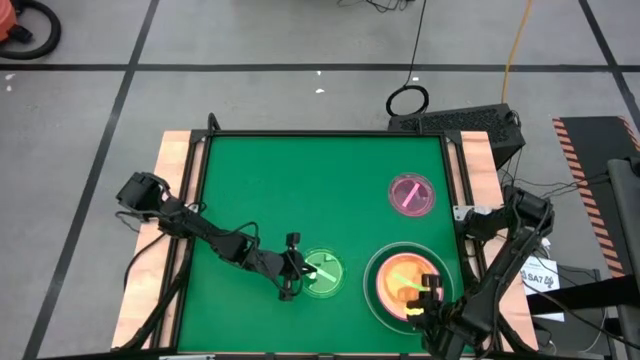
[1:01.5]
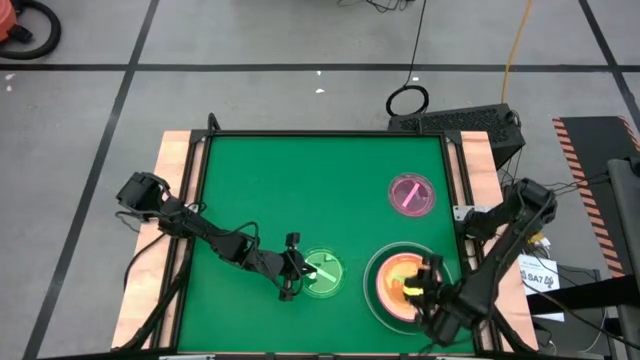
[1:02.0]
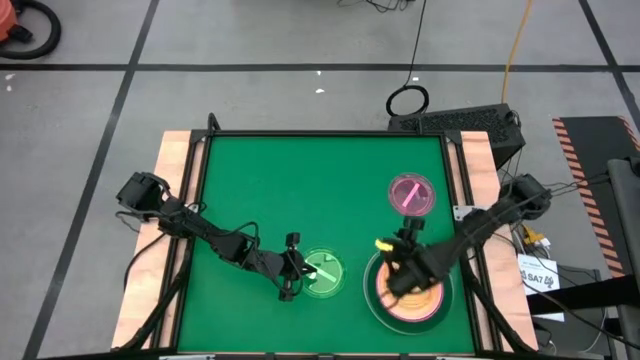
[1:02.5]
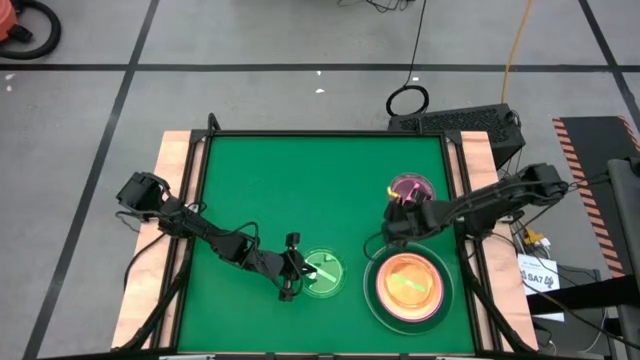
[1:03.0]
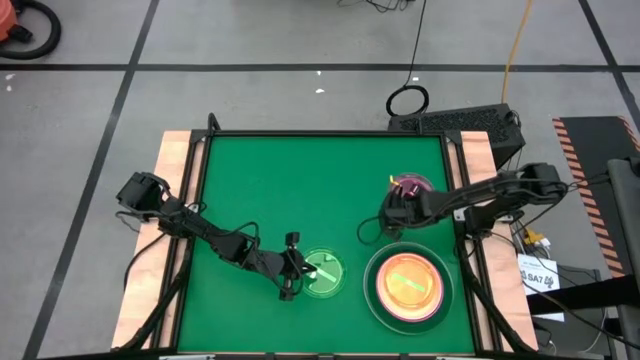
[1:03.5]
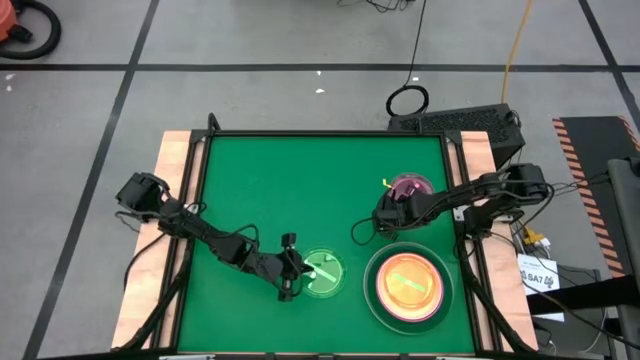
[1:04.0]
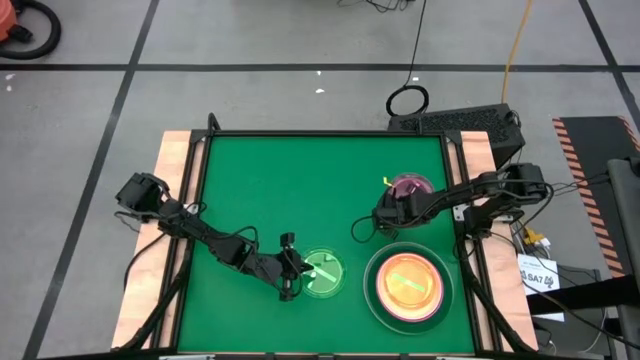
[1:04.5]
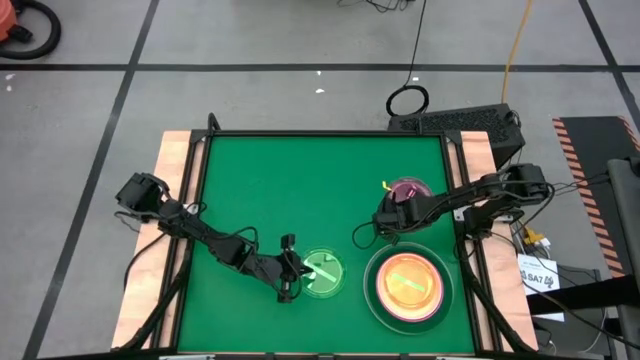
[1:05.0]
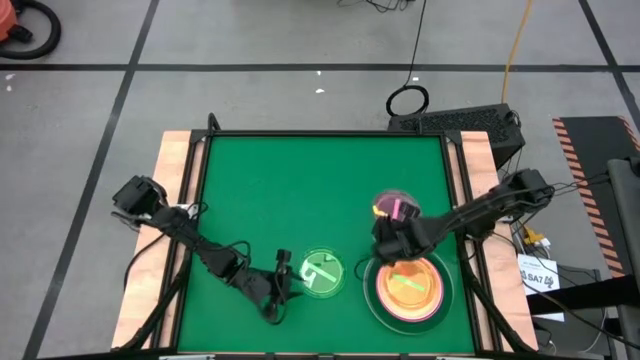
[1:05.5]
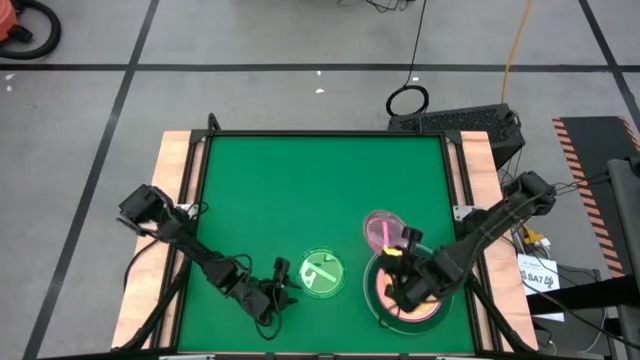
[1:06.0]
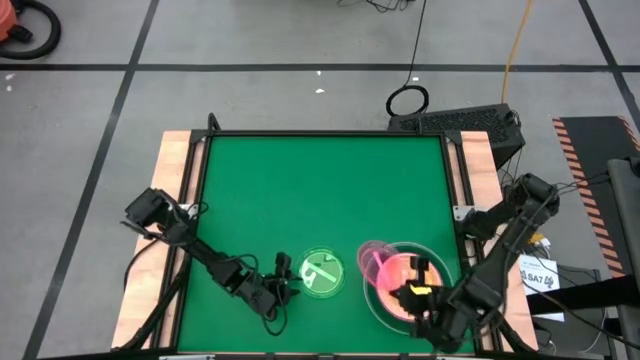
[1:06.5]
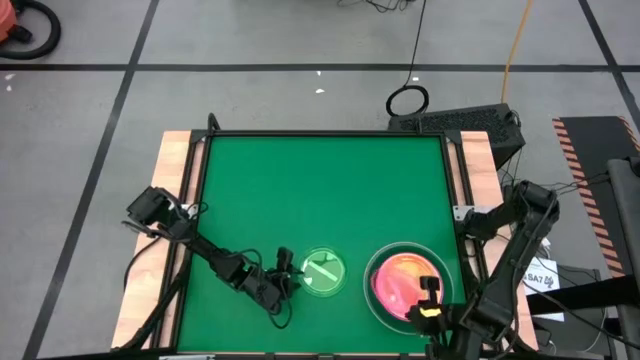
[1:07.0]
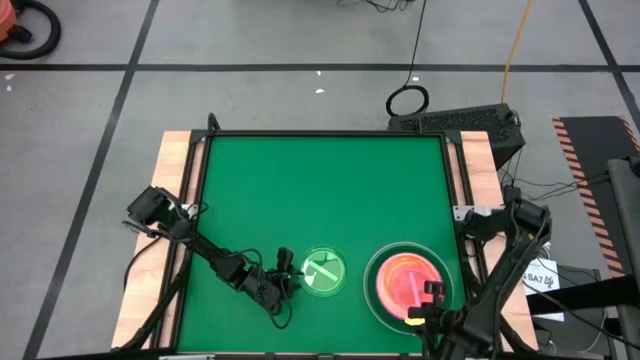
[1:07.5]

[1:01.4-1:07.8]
Task: Stack plastic plates
Stack the pink plate on top of the green plate

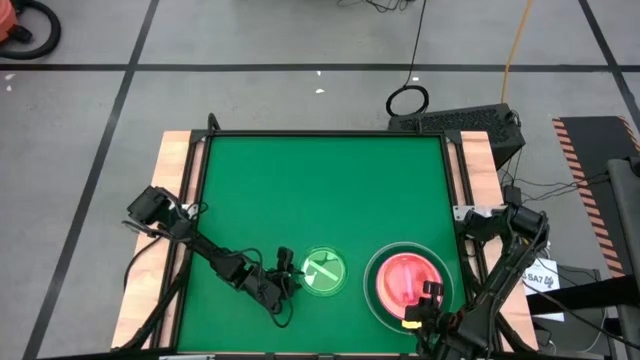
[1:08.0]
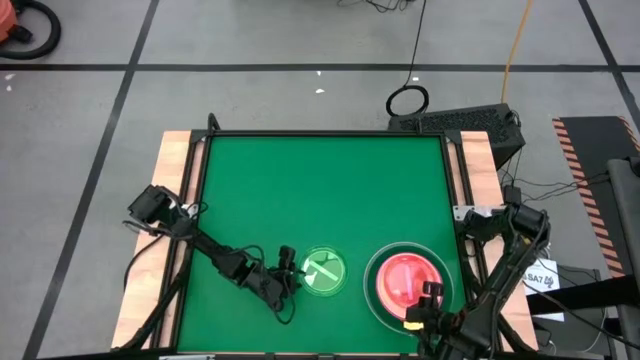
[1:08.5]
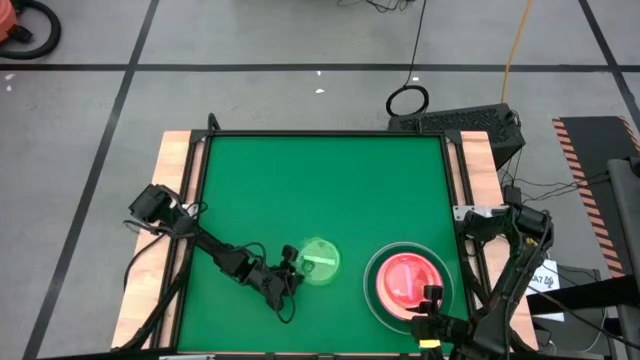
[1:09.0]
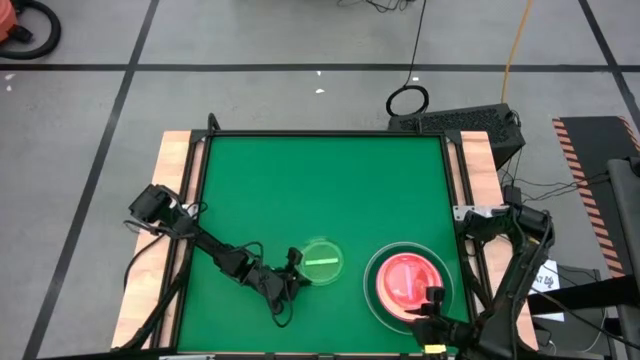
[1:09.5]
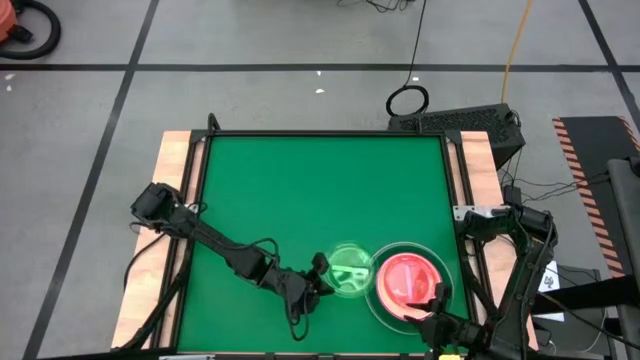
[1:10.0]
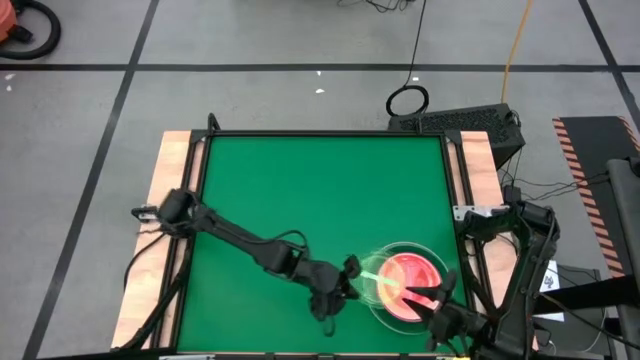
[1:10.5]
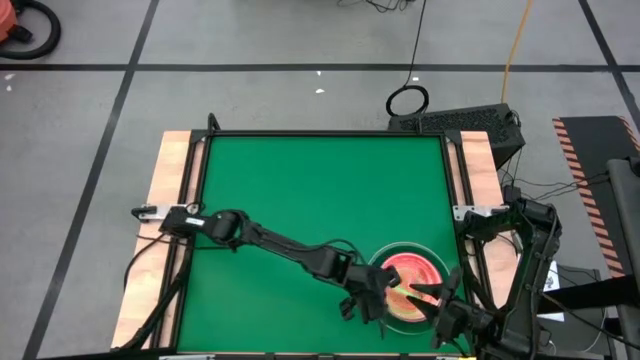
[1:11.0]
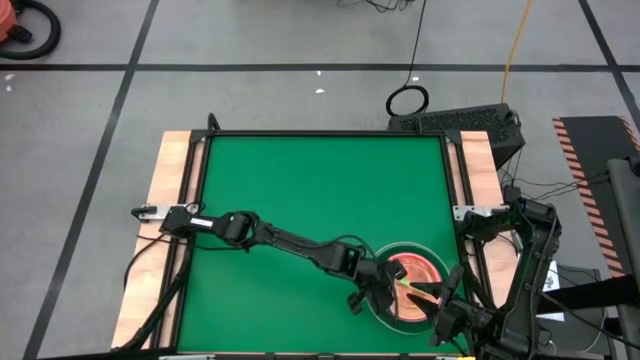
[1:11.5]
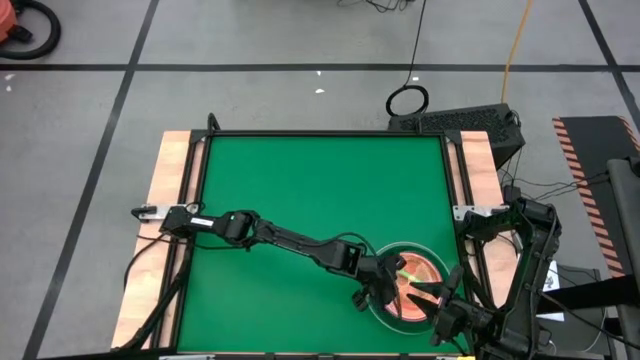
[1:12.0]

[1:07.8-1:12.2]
Stack the green plate on top of the pink plate

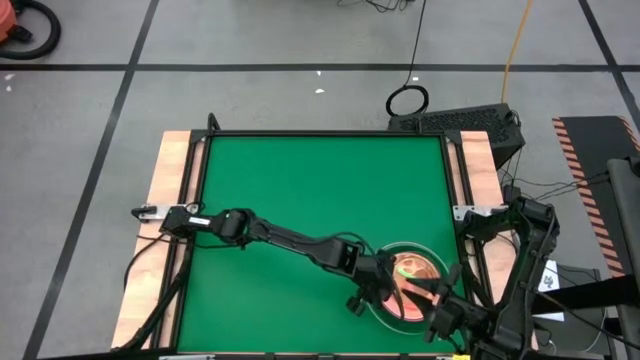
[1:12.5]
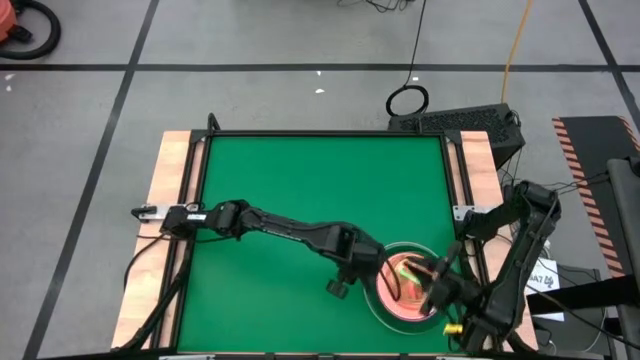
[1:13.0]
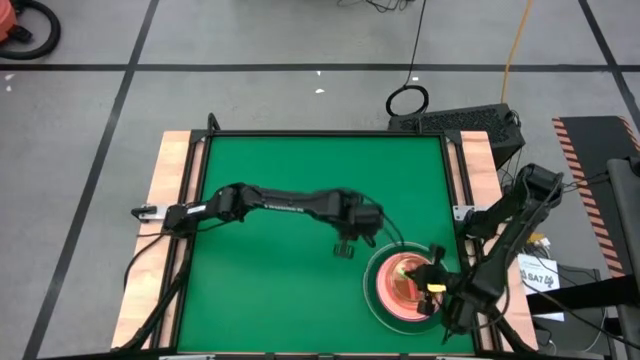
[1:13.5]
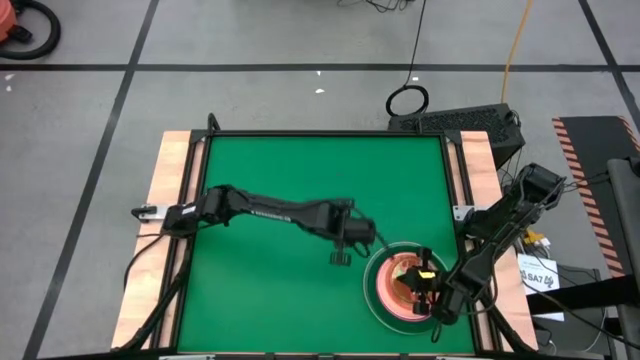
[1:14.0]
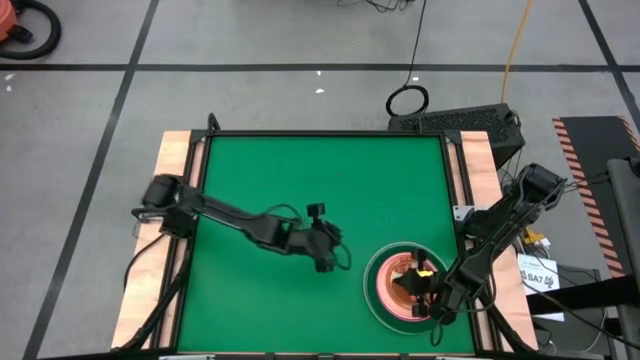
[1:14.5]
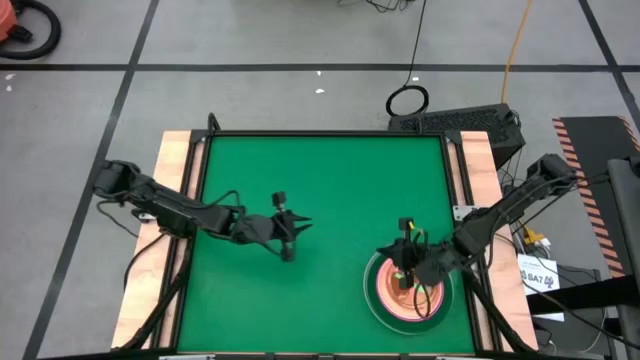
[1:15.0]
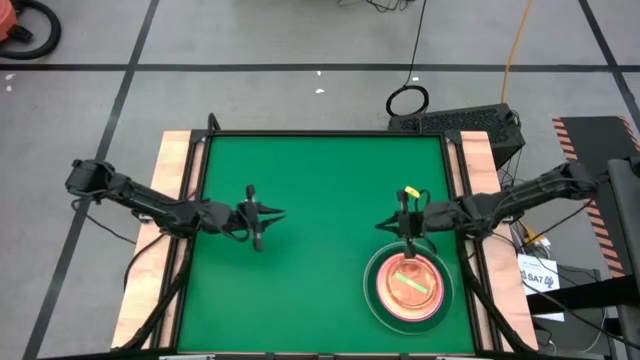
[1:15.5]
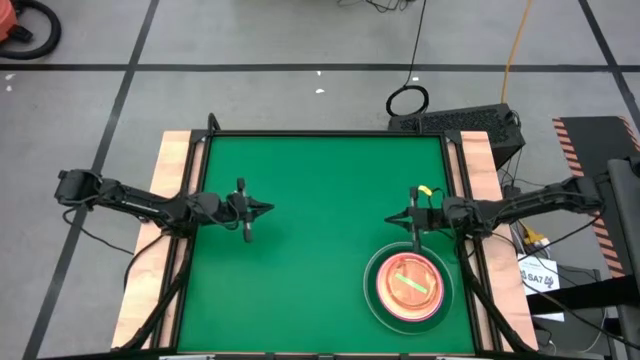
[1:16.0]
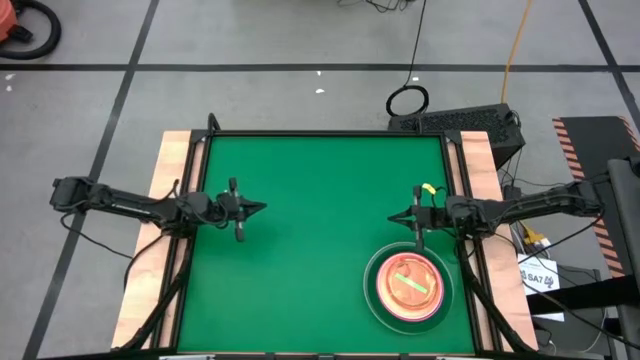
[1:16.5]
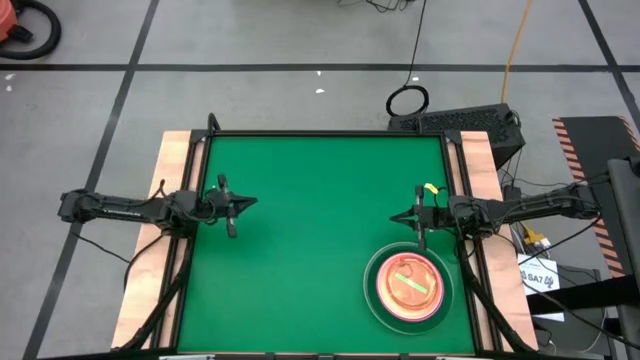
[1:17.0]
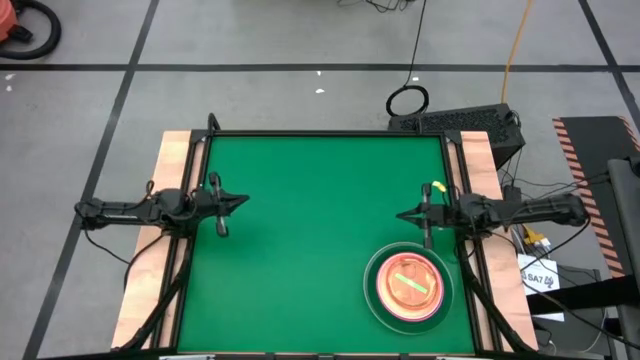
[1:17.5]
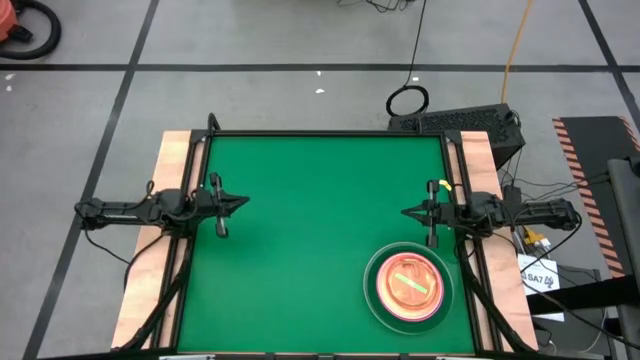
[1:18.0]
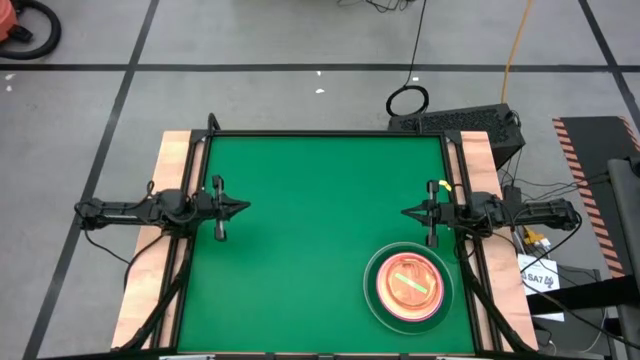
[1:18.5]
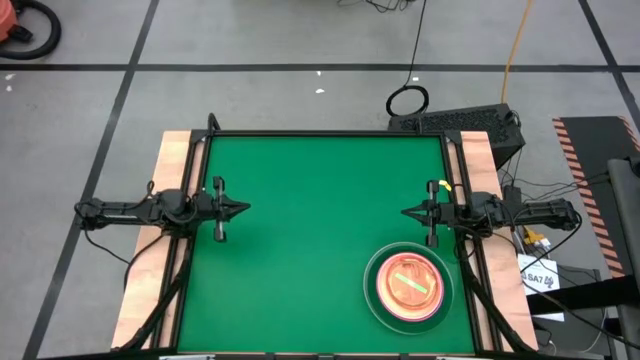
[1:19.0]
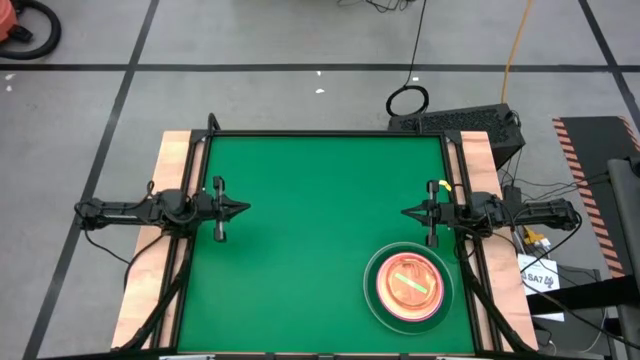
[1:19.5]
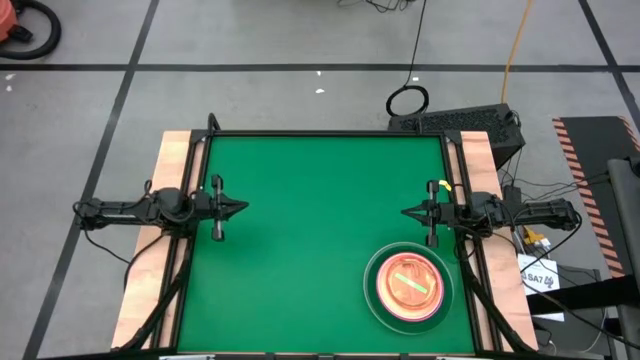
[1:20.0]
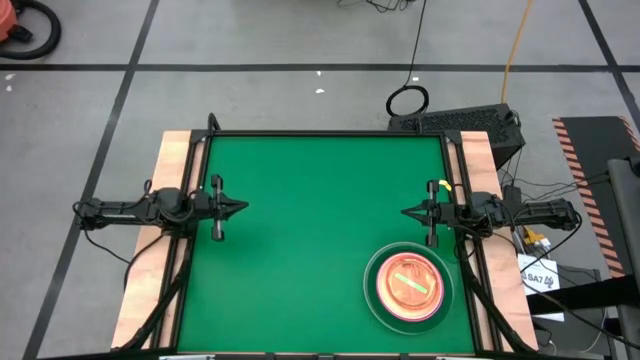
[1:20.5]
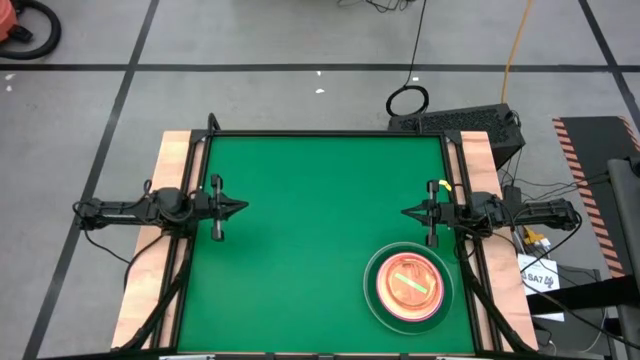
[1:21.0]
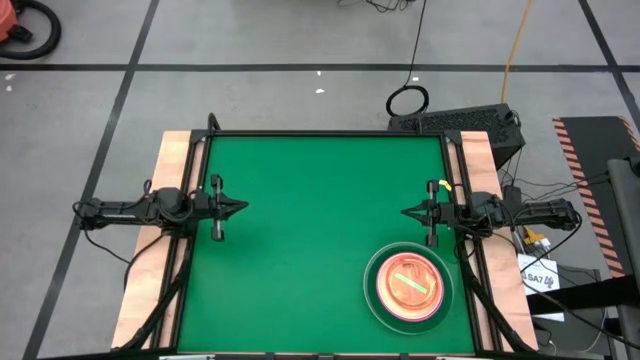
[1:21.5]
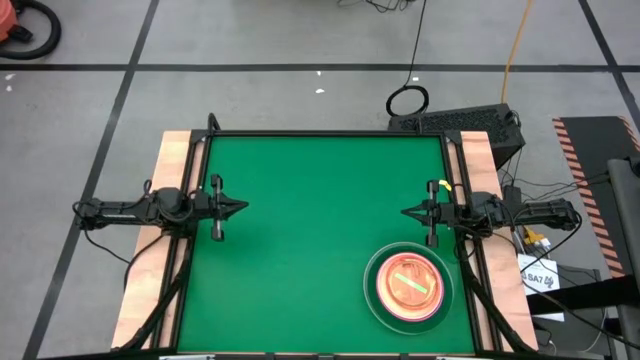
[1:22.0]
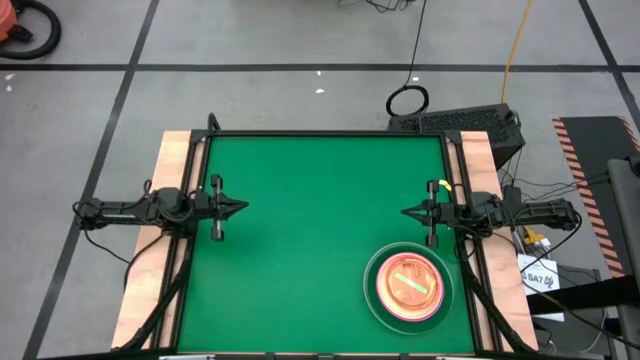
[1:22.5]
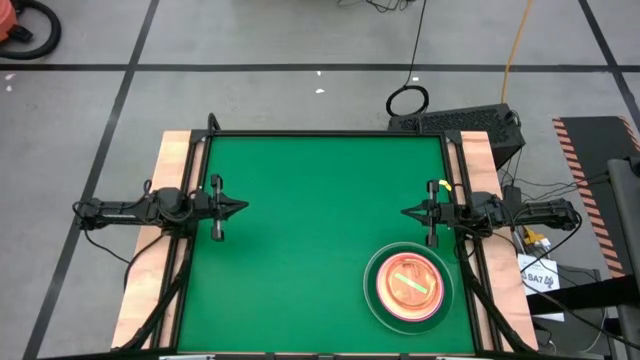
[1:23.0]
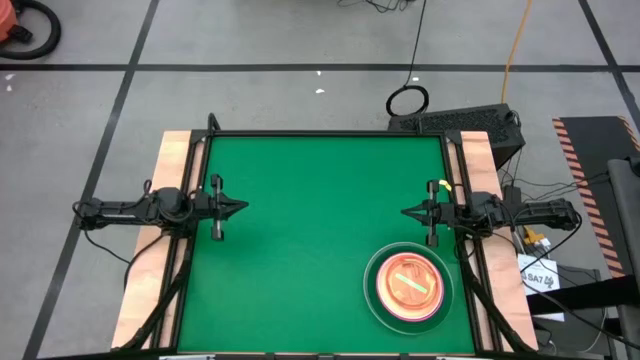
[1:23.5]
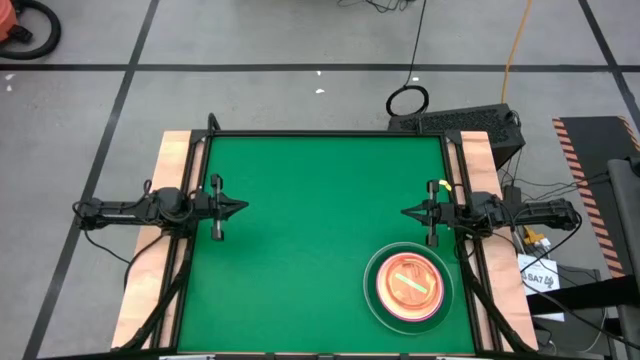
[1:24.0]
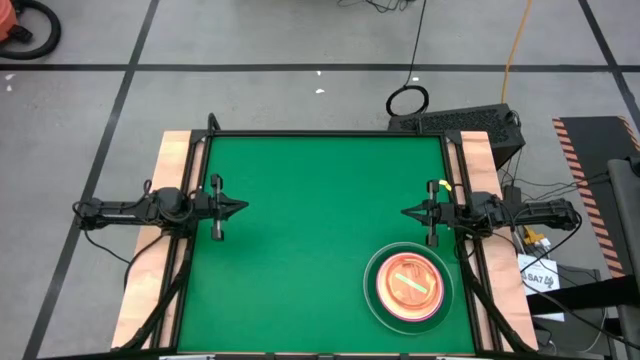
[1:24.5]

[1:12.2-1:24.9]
Return to Home Position
